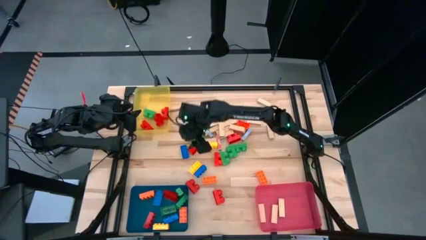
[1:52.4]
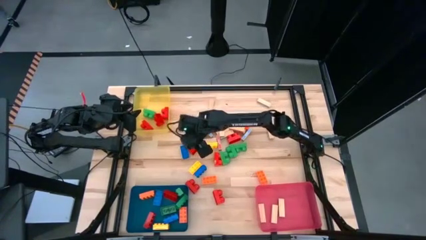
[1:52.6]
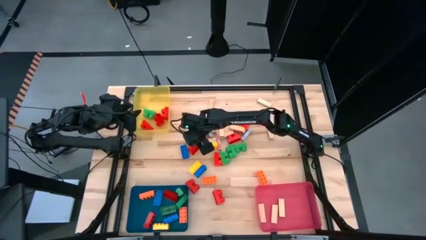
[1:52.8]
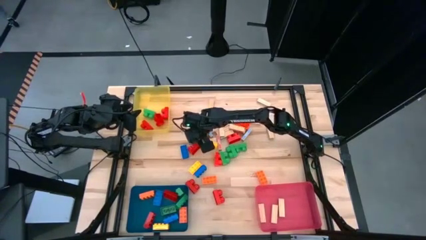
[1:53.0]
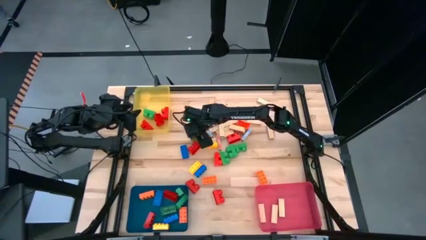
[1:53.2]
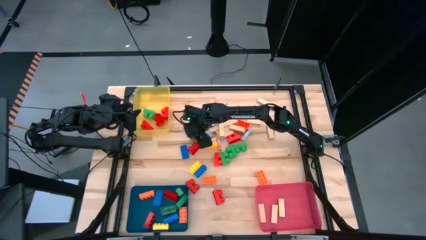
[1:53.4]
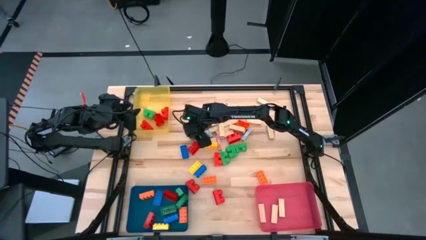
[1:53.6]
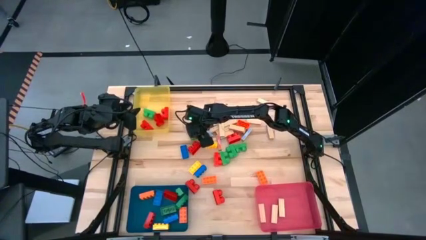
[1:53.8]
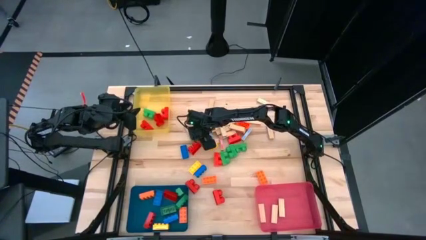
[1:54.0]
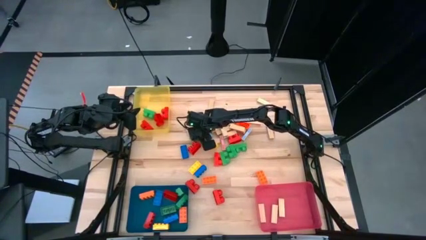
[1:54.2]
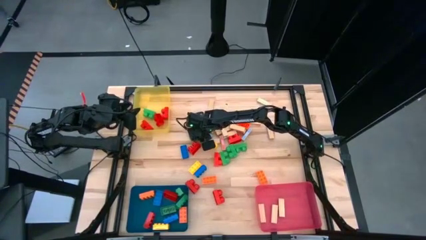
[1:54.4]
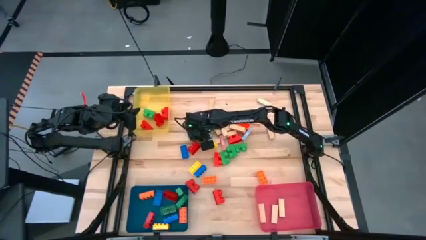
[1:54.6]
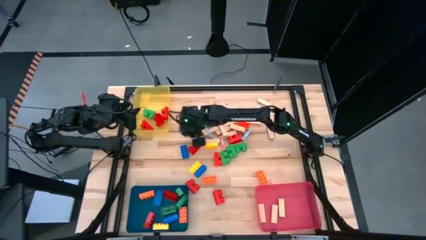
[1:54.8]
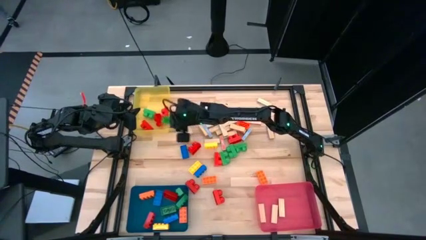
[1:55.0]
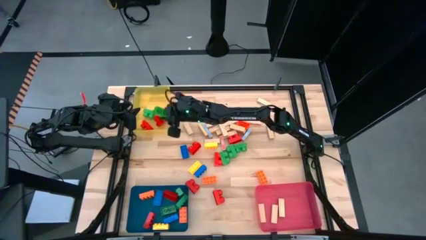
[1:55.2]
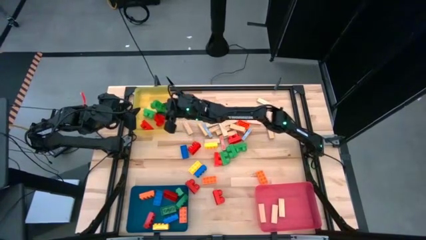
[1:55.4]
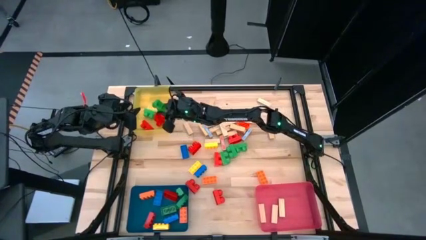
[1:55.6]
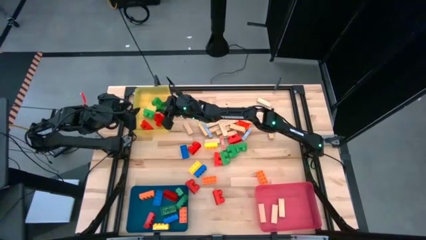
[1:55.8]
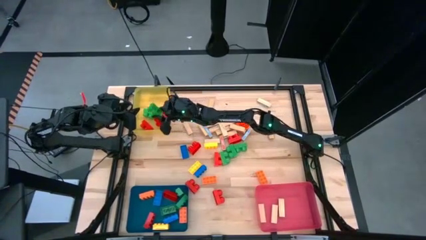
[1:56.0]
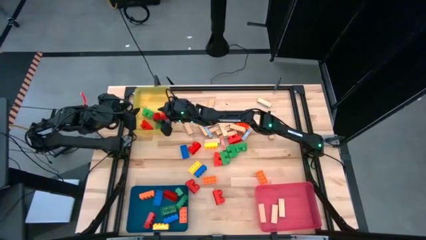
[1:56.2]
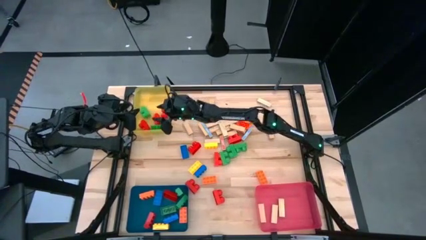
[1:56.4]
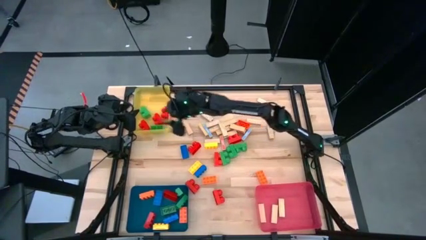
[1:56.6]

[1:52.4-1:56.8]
Task: Sort blocks by size
Put the round green game piece into the yellow bin

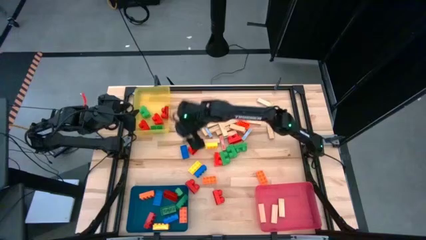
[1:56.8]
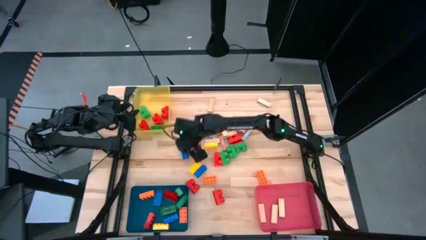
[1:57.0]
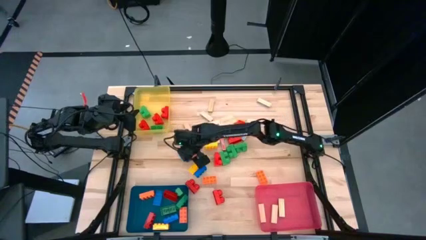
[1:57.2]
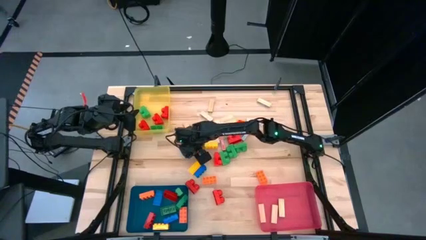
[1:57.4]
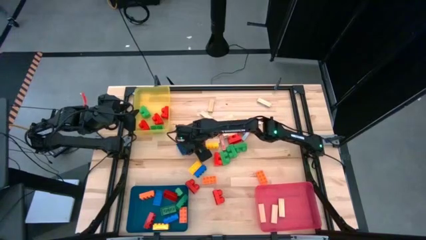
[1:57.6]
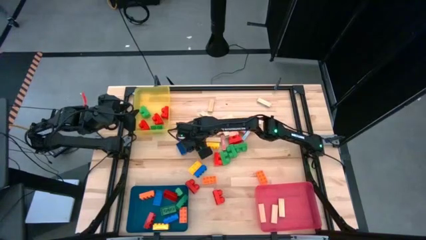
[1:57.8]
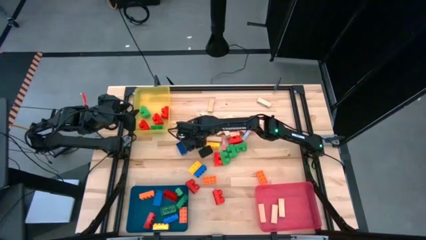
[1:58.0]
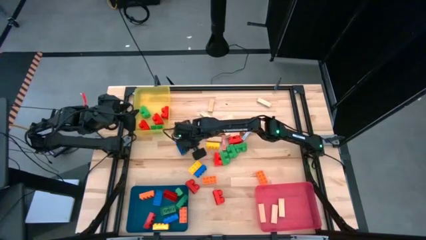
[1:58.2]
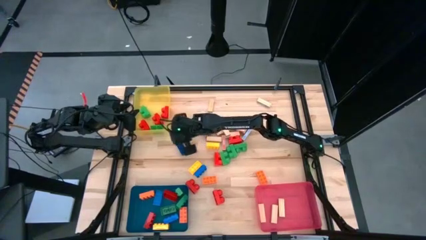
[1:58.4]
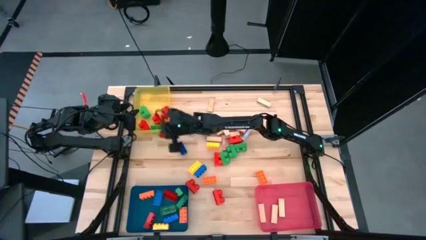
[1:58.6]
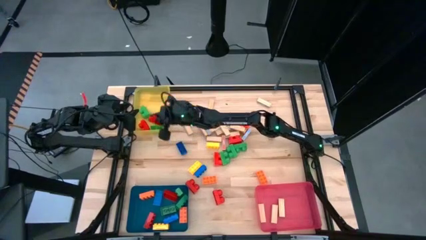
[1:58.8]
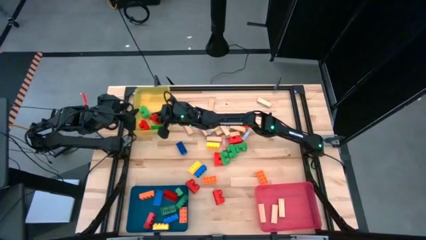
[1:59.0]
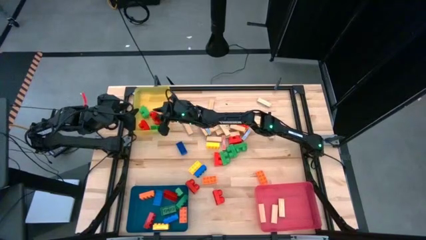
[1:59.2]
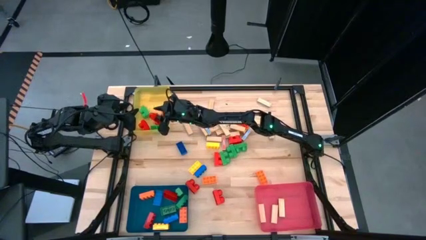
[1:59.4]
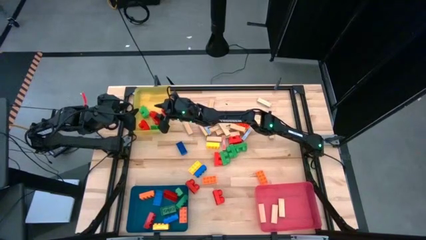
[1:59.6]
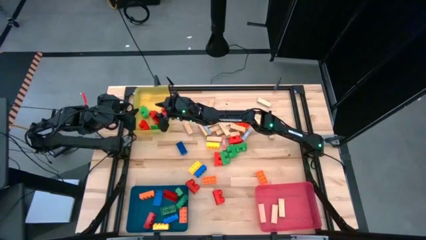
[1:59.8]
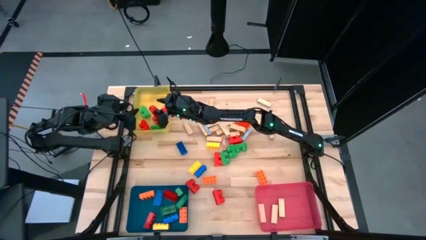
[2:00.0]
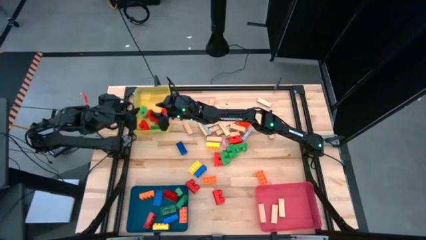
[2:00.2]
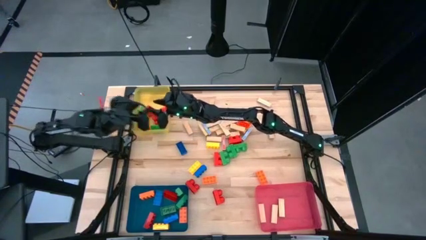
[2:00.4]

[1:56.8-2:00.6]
Put the round red game piece into the yellow bin

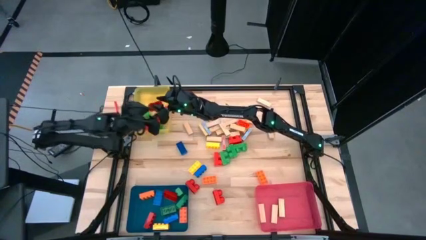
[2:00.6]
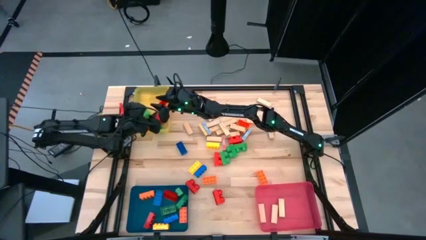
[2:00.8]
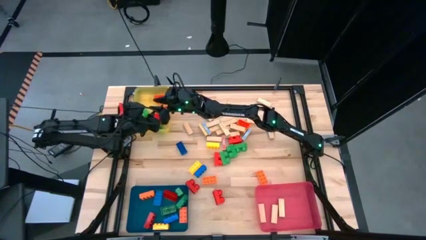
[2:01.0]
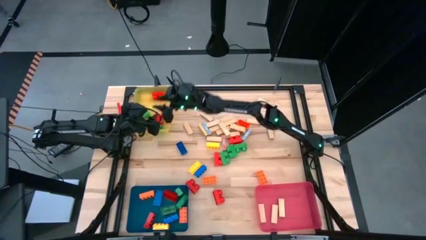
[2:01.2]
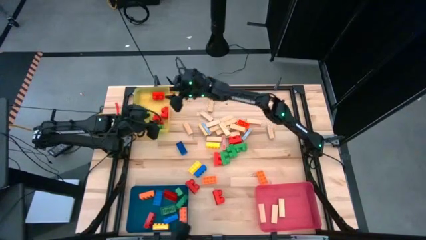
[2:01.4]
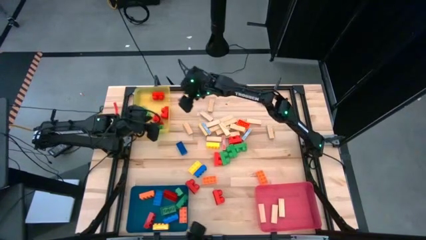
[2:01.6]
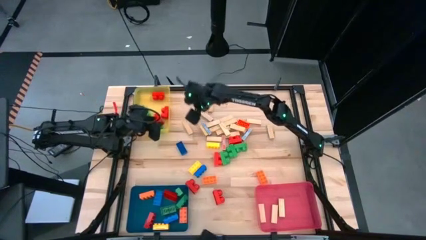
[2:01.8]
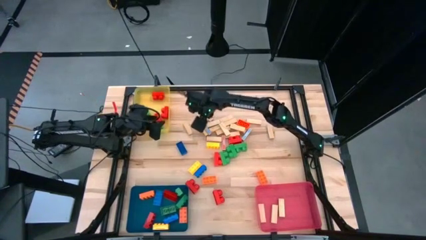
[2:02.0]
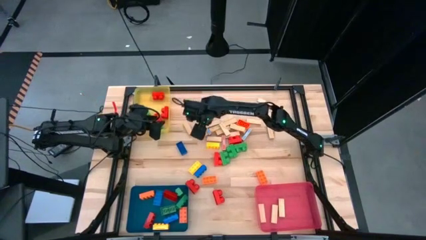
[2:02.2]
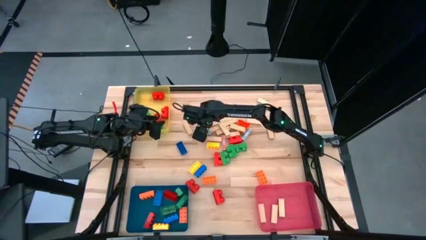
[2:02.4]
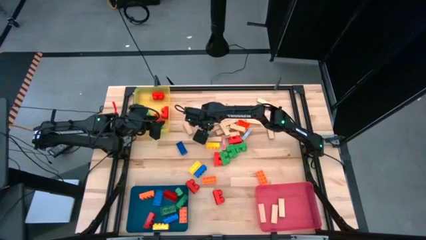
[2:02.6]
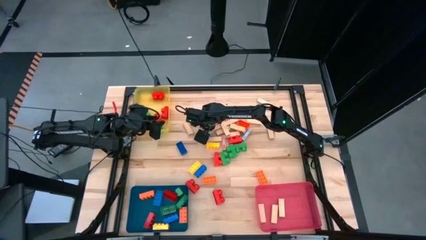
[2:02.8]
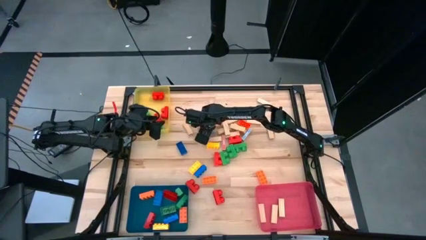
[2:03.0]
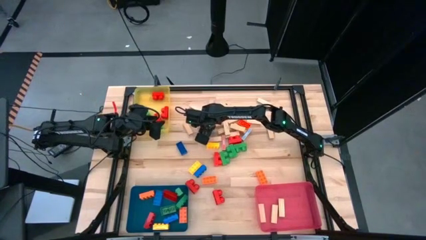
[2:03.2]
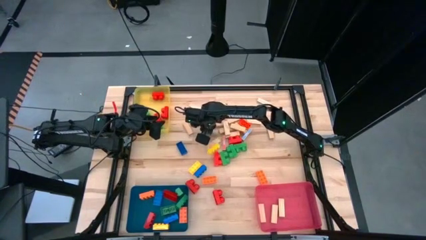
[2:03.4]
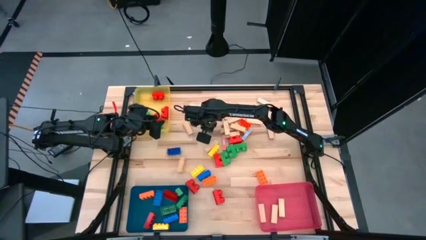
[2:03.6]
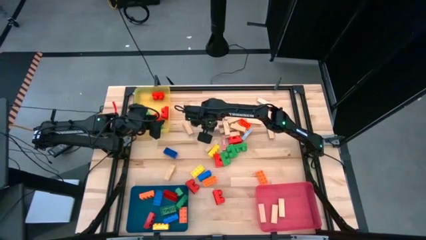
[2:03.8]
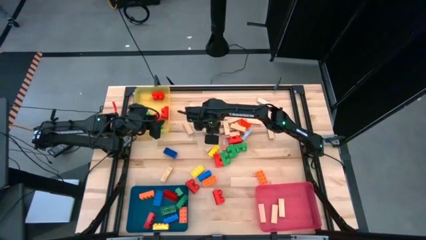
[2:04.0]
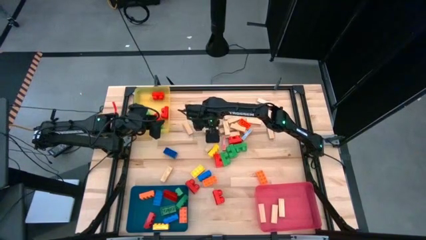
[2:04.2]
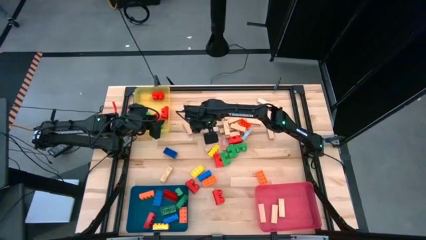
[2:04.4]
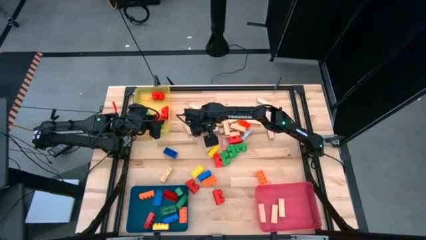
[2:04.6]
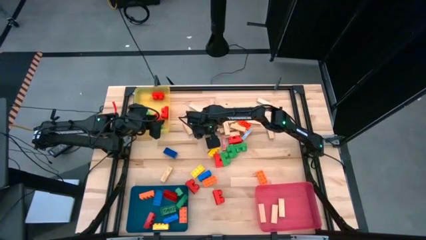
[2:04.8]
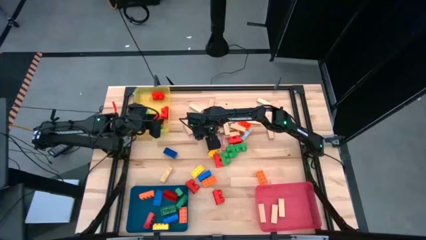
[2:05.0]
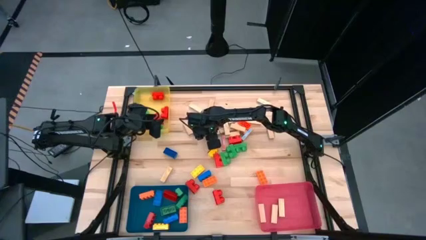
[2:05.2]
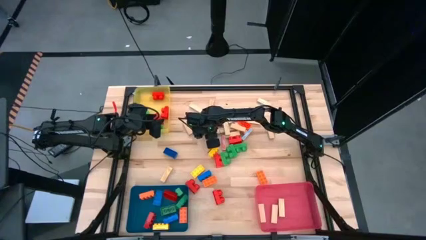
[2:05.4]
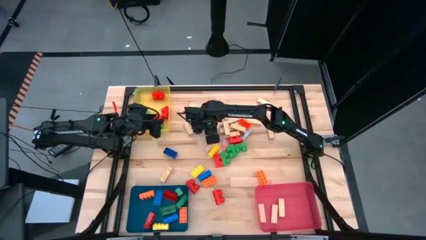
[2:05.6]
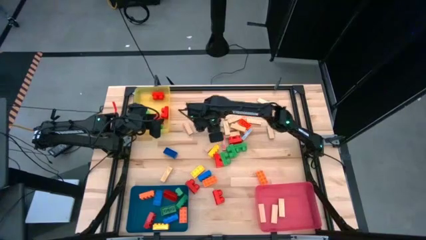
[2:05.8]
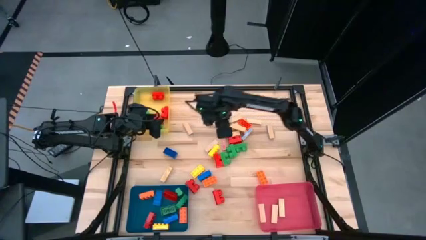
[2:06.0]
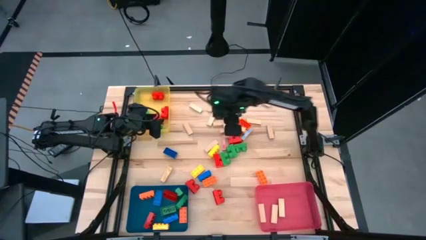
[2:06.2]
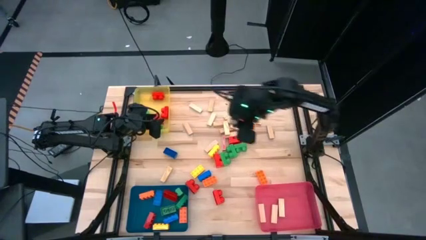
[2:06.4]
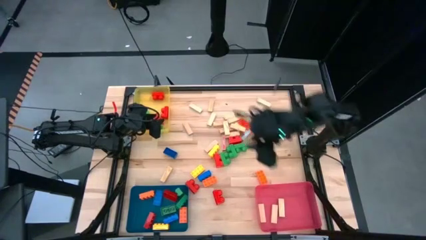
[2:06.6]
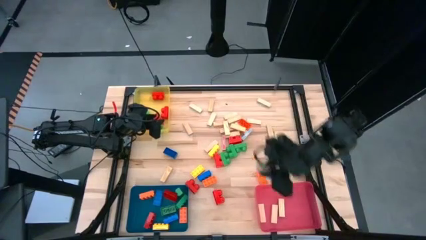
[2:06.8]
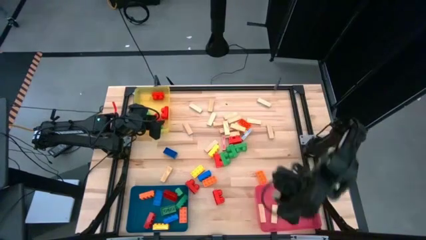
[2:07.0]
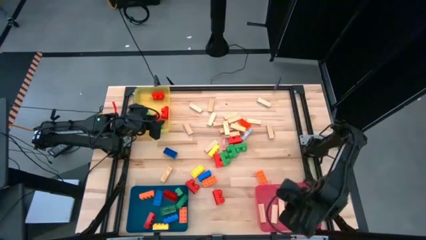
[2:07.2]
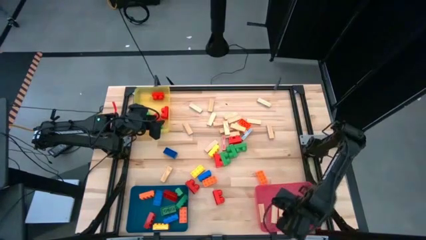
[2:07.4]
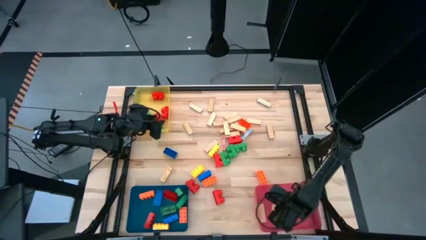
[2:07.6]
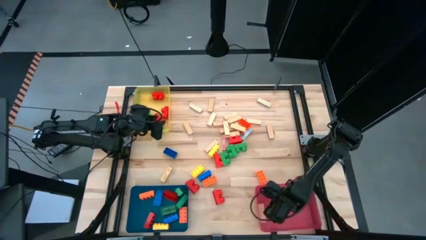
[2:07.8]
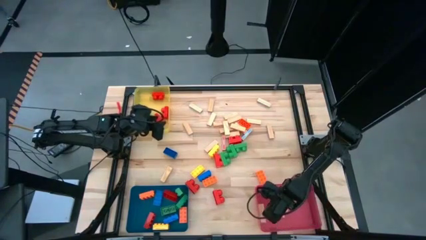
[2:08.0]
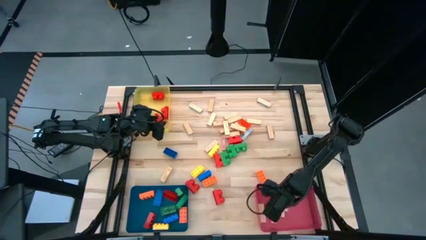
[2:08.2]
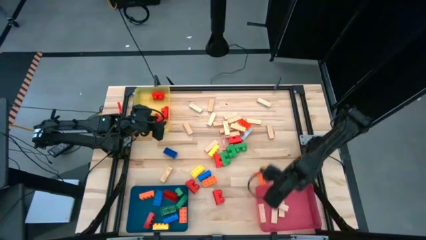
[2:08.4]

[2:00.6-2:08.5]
Put the wooden game piece into the red bin
